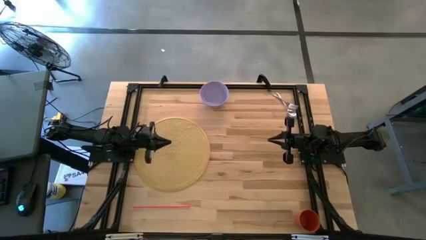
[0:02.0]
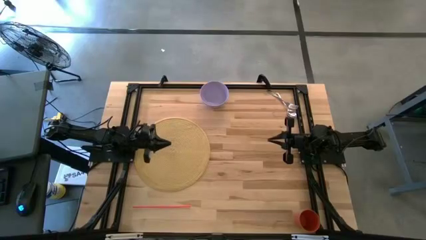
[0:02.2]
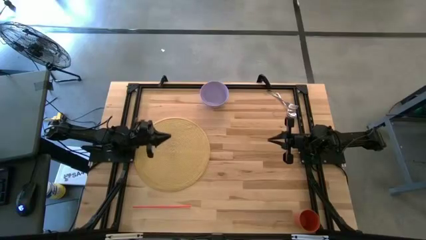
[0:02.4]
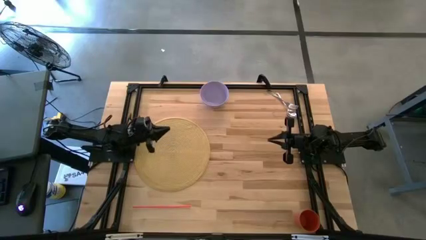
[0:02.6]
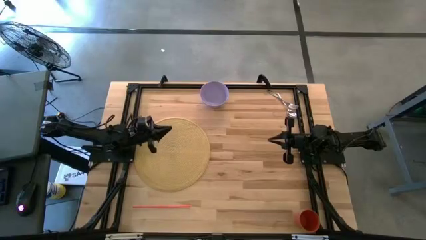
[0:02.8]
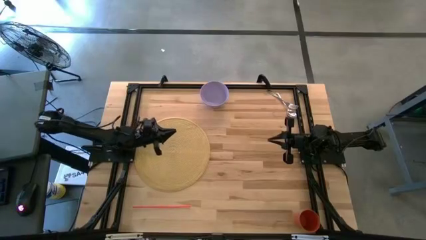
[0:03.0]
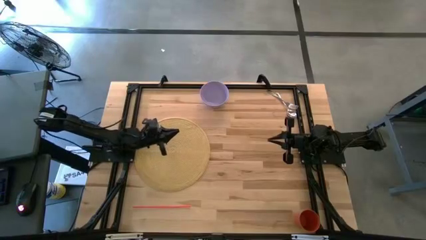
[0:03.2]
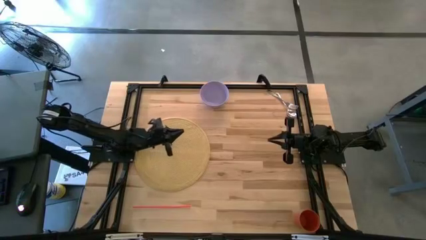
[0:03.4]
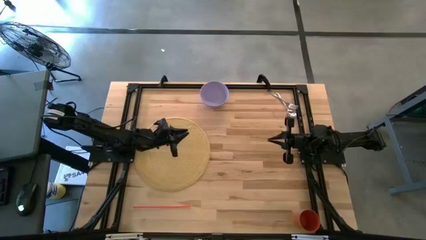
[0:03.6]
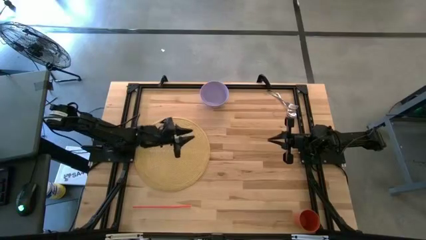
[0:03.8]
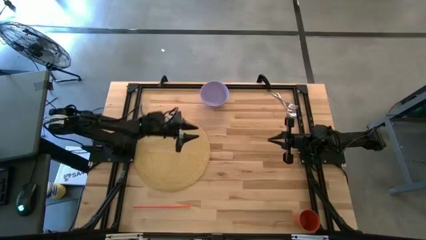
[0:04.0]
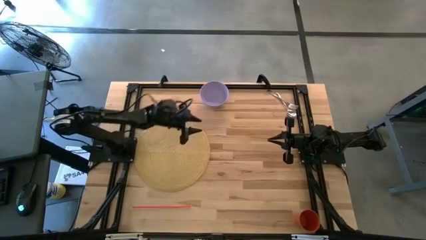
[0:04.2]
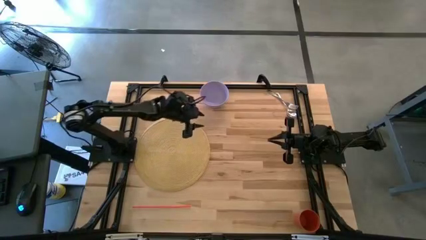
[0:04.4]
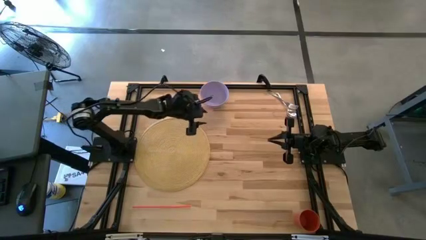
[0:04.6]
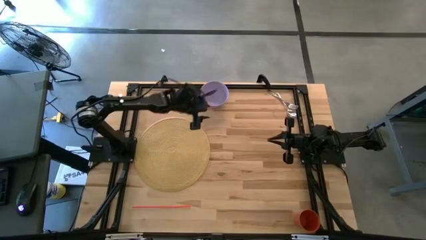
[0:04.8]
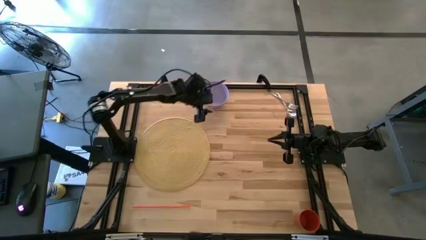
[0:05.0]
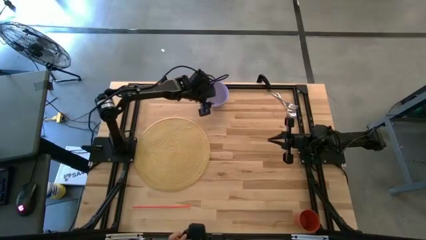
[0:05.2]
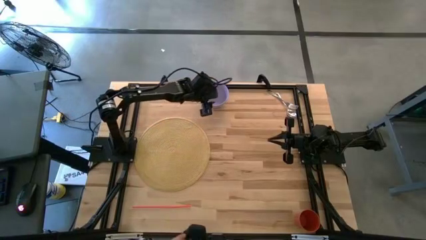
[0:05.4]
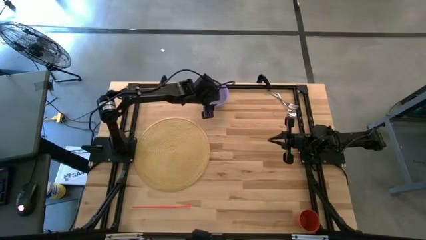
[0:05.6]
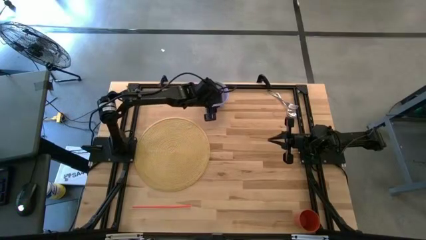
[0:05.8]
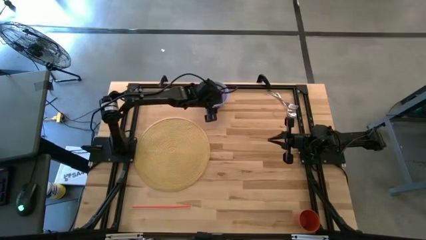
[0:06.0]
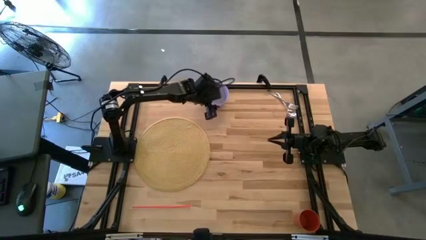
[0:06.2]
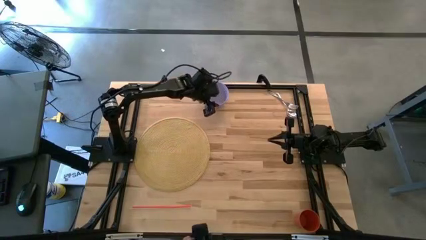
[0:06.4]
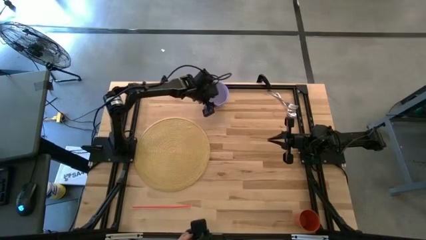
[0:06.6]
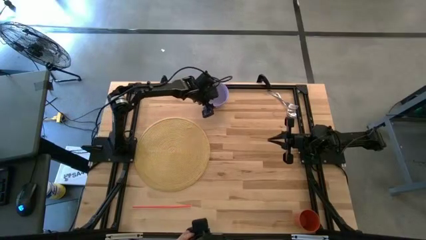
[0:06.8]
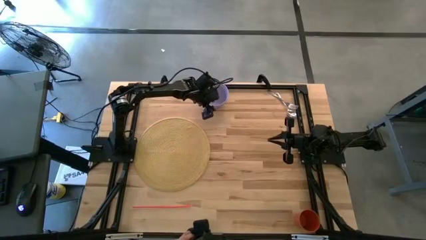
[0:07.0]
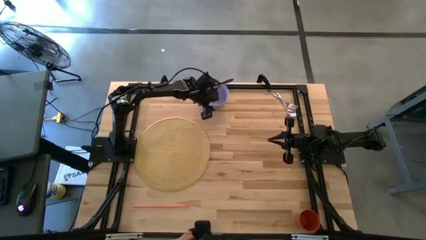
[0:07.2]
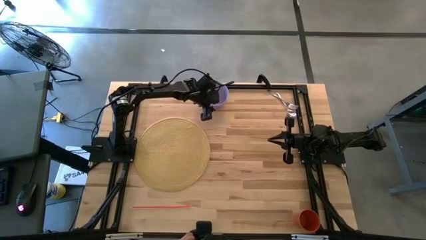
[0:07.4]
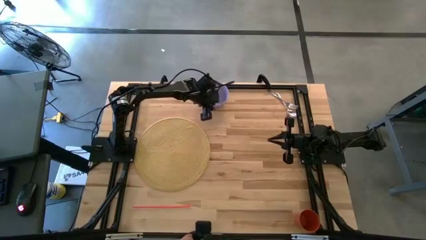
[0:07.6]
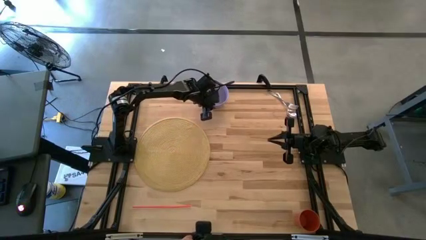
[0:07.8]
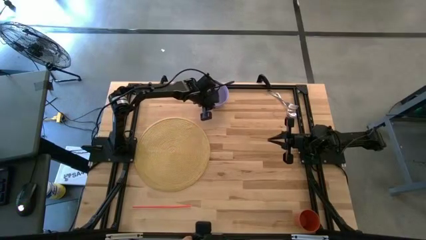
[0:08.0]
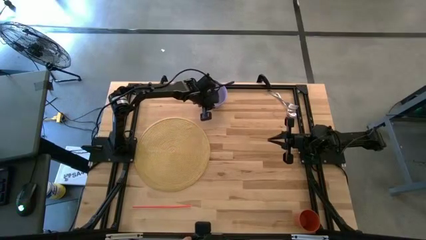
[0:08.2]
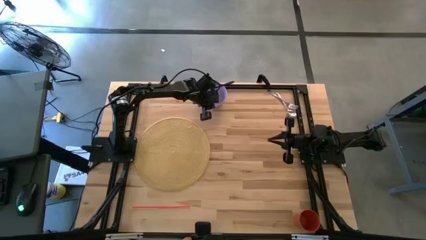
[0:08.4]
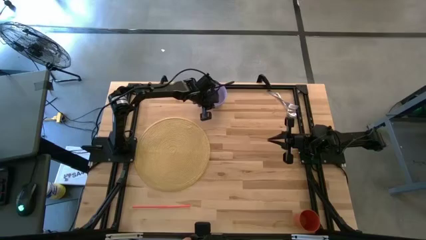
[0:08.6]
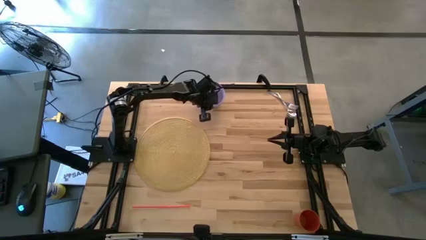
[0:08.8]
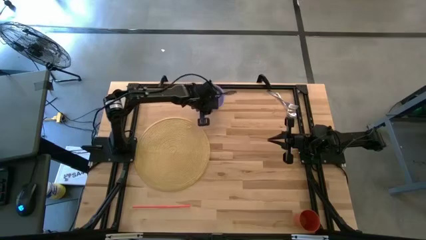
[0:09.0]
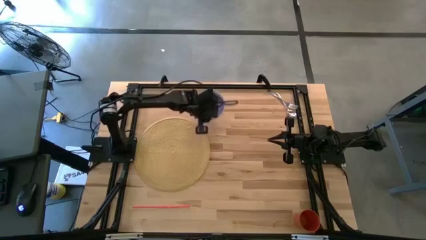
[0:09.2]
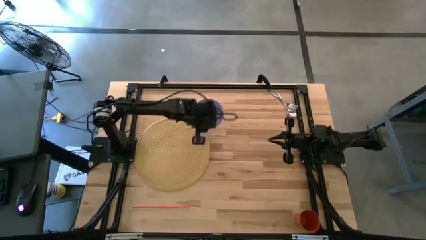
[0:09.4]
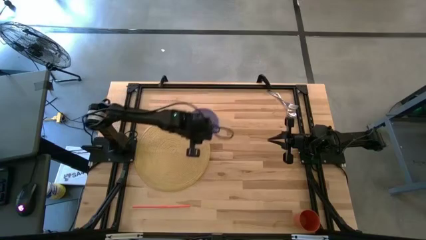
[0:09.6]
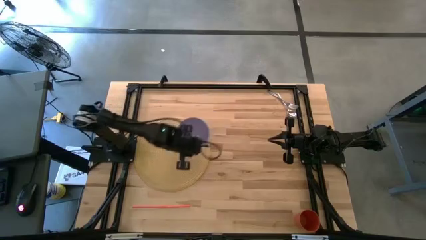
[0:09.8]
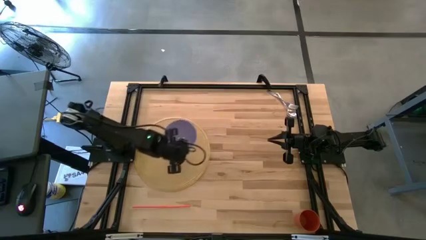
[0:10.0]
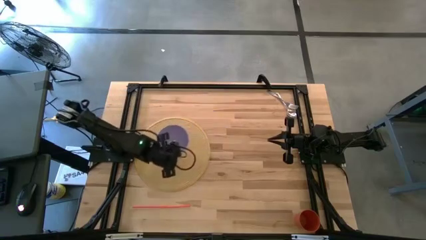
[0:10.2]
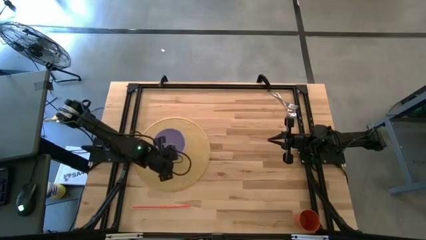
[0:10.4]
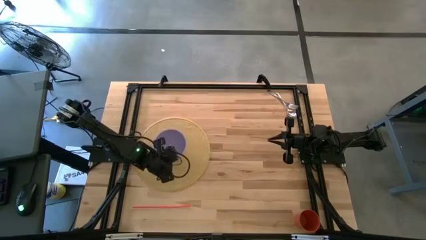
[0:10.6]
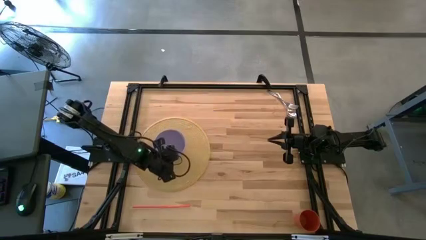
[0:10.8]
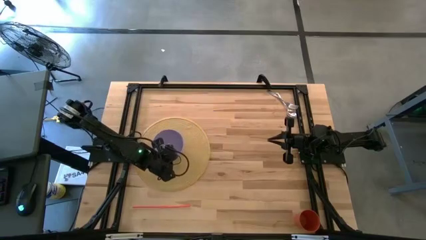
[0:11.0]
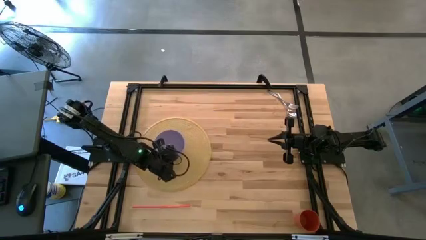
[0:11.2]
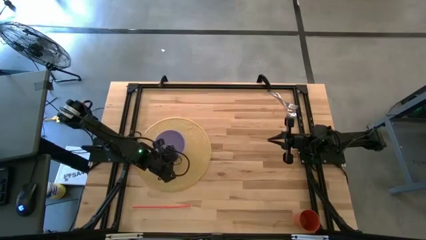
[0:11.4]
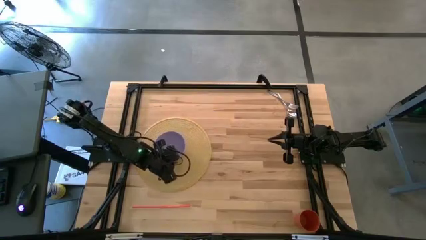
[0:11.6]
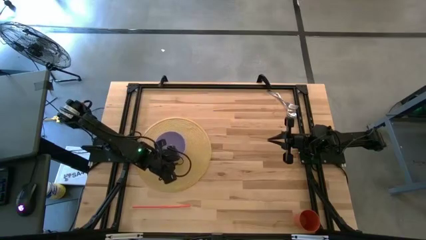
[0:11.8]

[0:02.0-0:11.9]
Task: Pick & Place Utensil
Put the purple bowl on the brown placemat

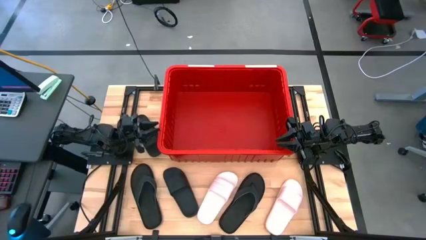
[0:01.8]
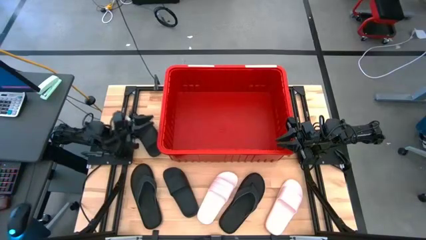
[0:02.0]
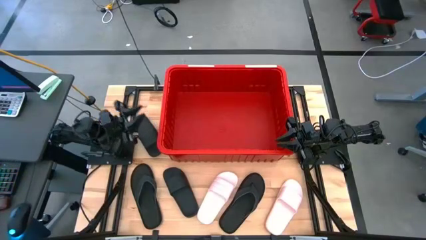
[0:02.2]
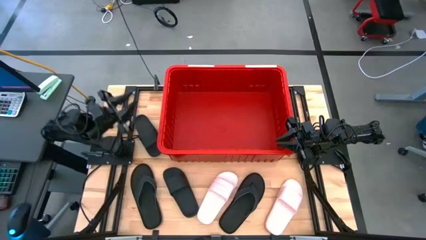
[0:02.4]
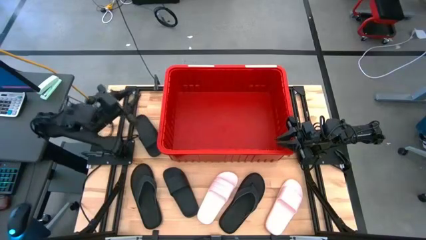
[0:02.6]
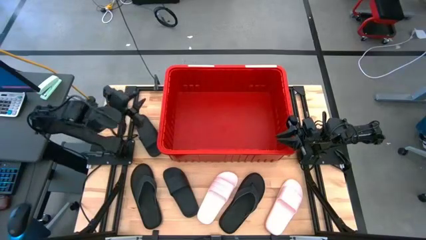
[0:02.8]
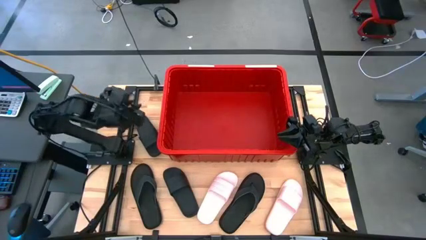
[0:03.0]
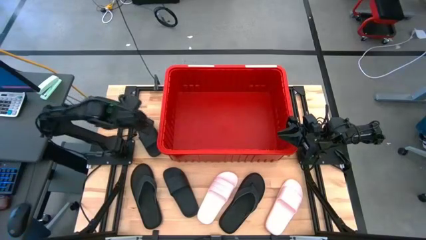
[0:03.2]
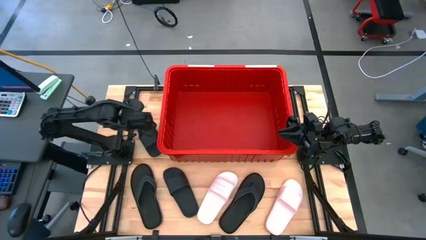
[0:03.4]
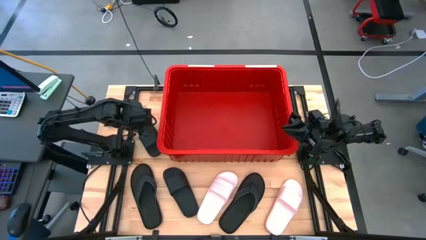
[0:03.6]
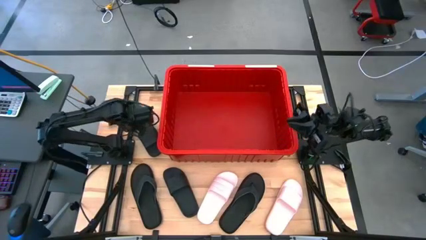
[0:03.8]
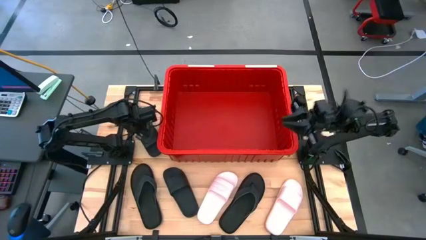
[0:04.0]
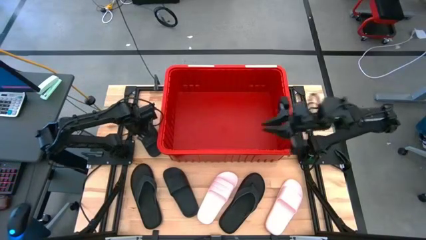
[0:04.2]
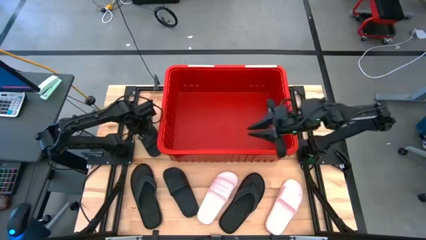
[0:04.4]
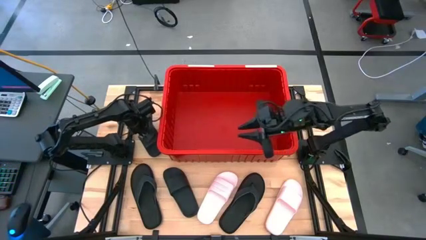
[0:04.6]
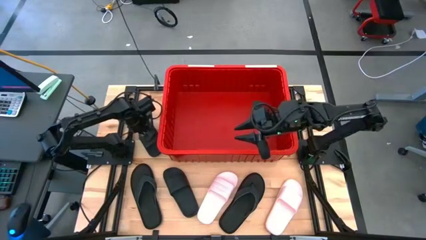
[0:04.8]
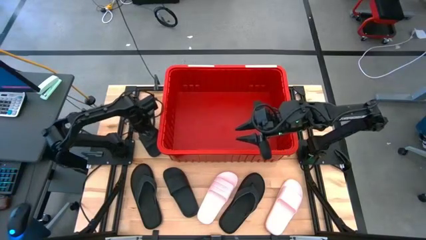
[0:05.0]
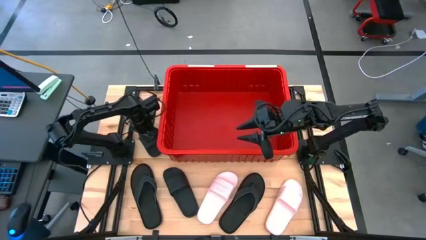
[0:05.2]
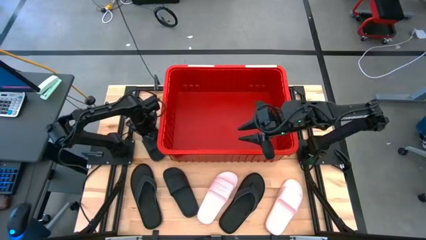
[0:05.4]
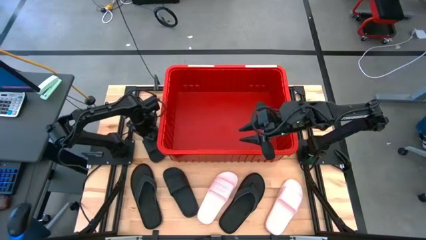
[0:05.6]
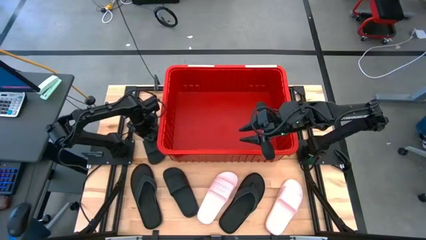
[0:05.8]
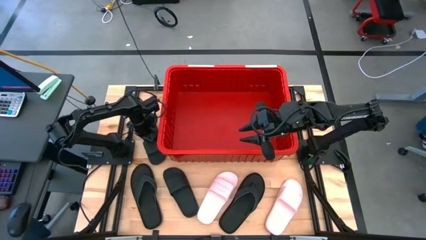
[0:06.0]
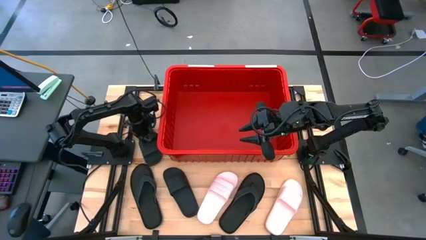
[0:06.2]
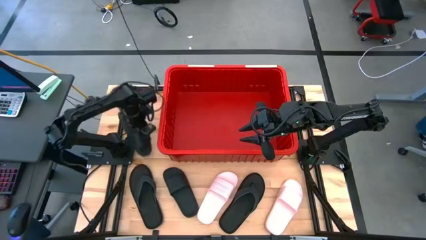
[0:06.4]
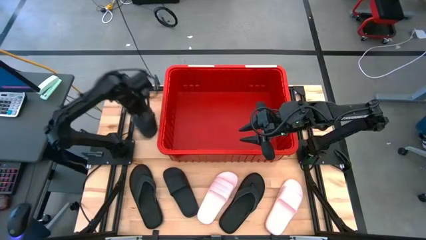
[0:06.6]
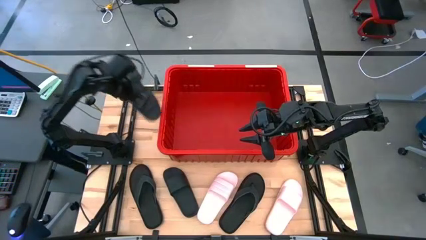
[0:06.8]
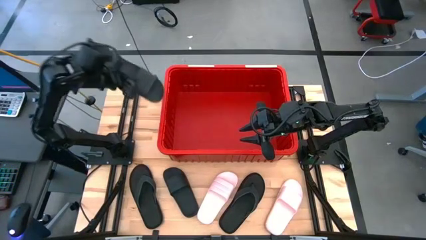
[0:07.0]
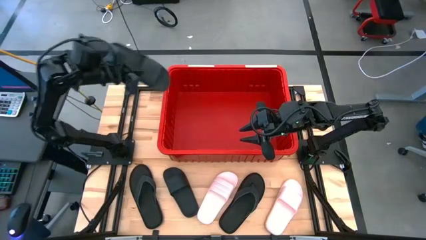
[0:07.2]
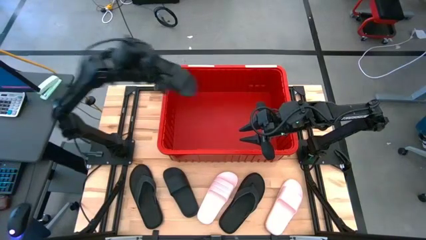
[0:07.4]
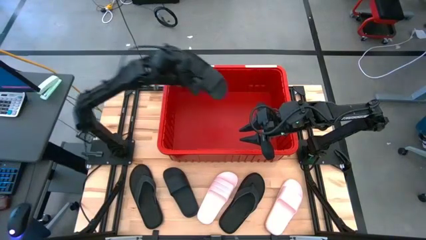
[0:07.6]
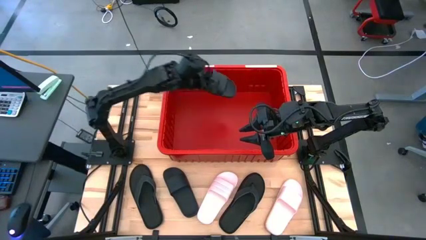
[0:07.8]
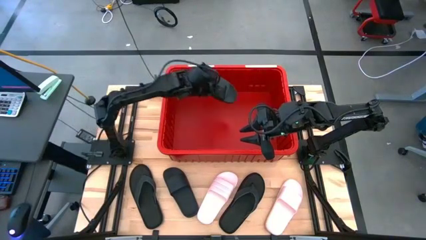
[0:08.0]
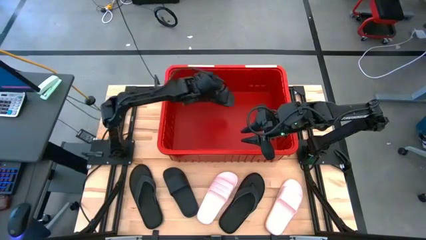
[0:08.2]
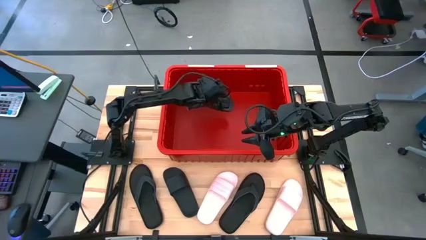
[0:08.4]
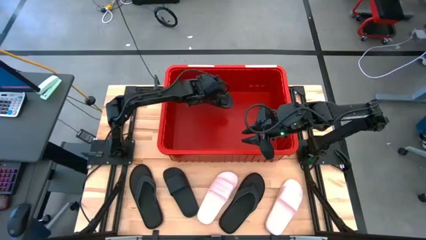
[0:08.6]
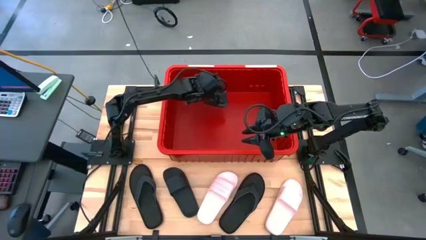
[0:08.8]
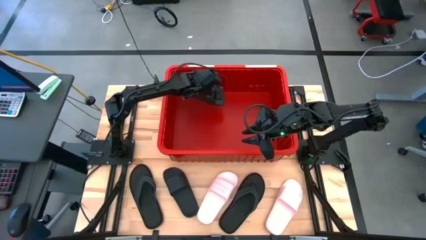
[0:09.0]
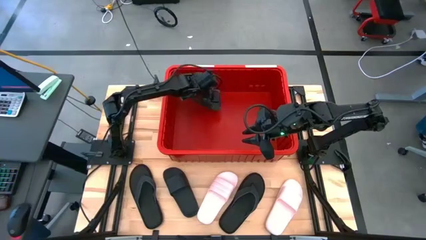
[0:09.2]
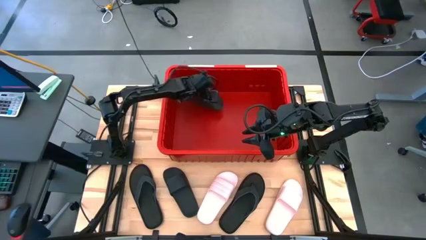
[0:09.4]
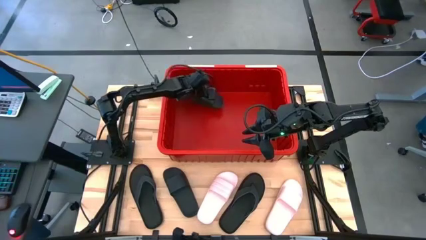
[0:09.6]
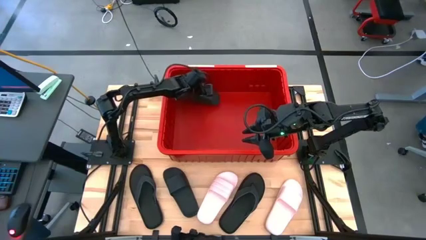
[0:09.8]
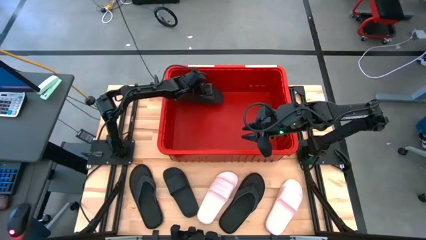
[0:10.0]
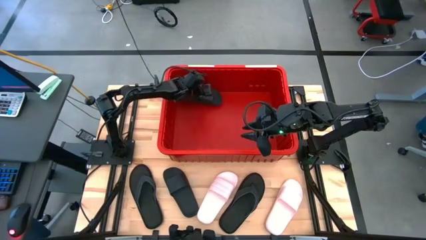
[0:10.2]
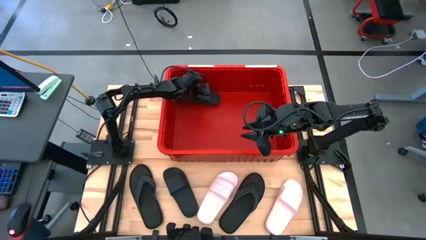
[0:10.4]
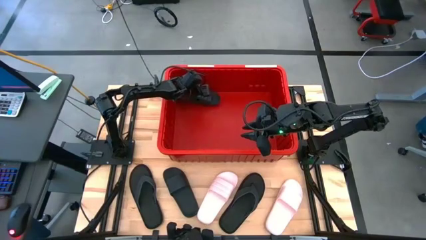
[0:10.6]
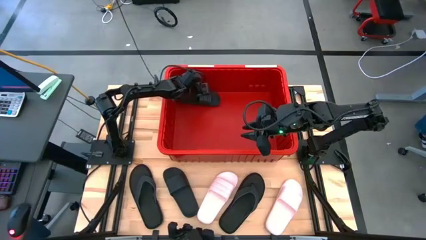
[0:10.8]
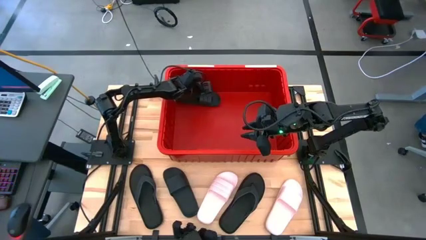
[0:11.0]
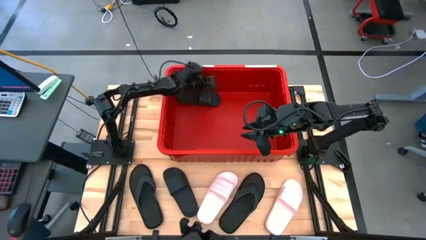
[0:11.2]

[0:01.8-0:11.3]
Task: Pick and place slides into bin
Put the top black slide into the red bin
